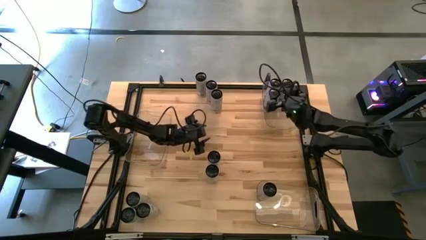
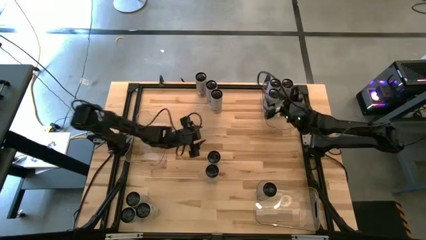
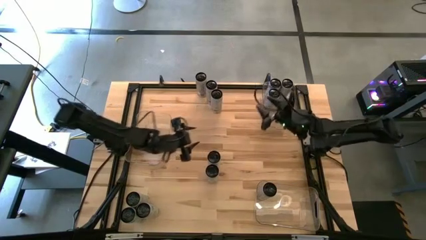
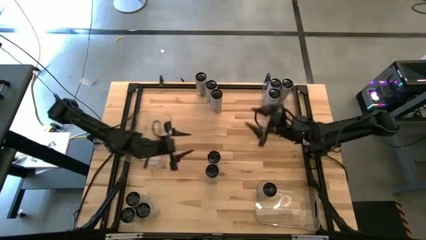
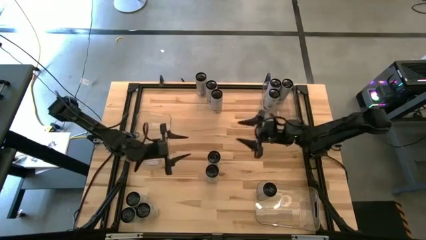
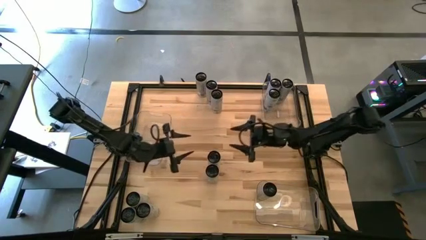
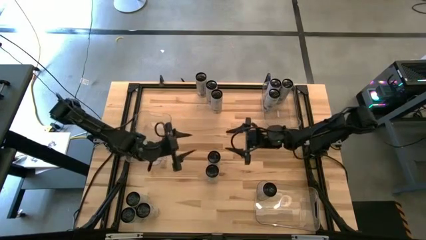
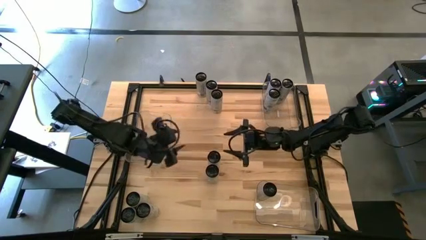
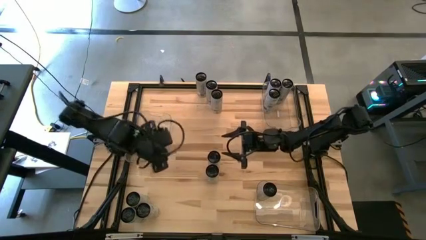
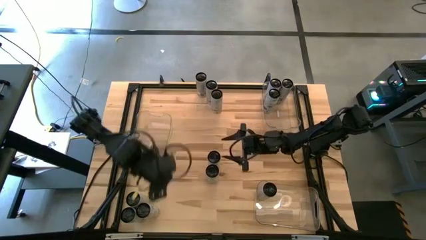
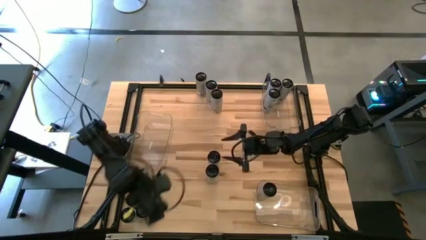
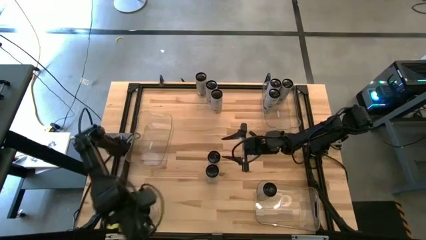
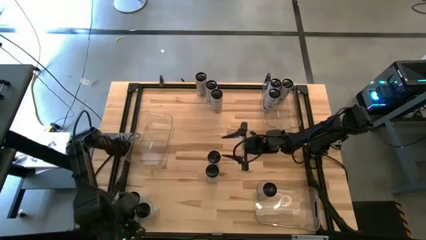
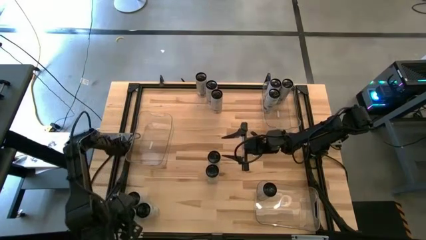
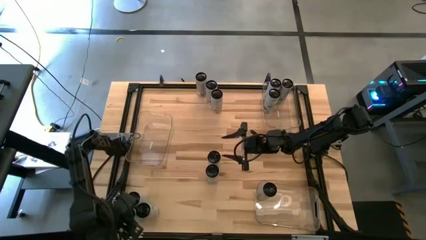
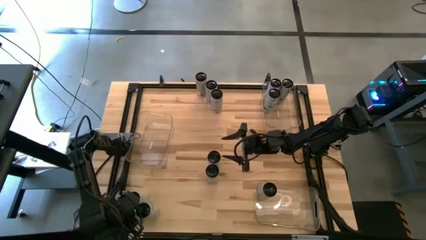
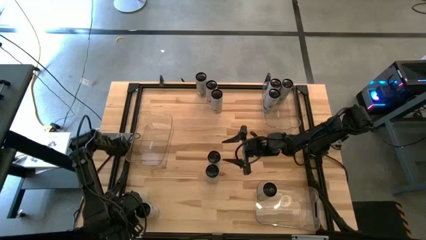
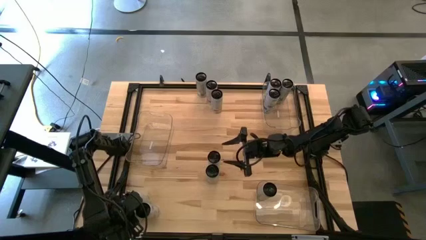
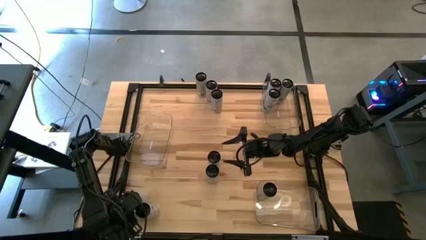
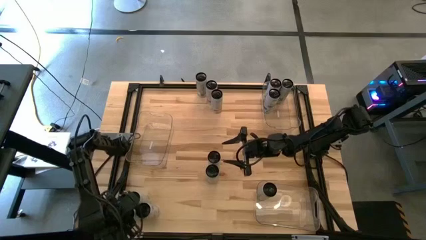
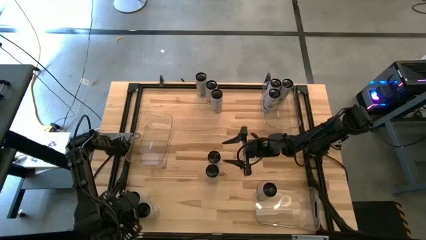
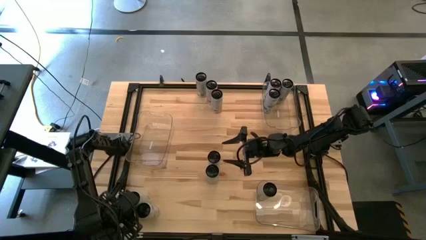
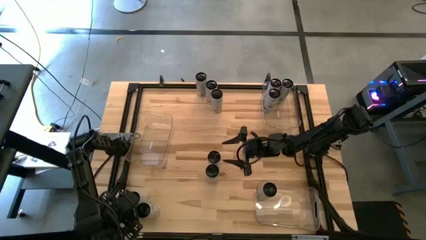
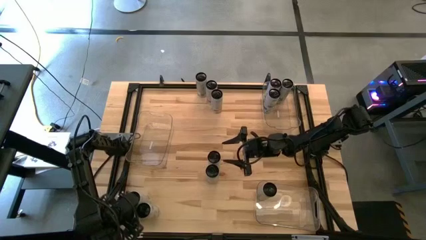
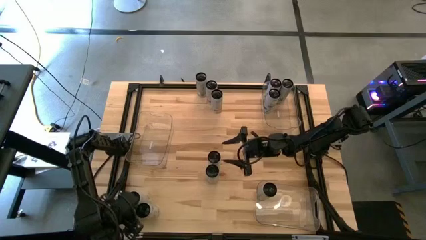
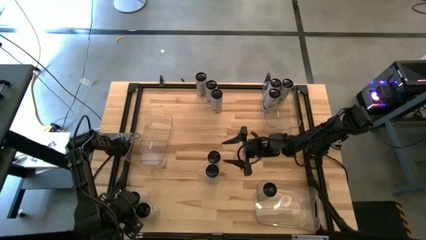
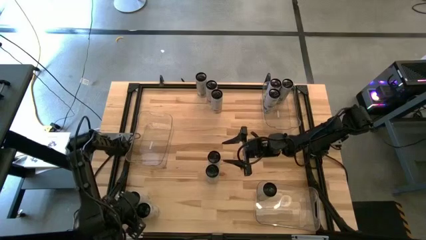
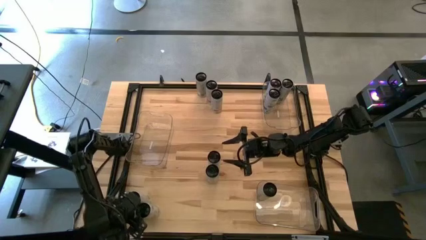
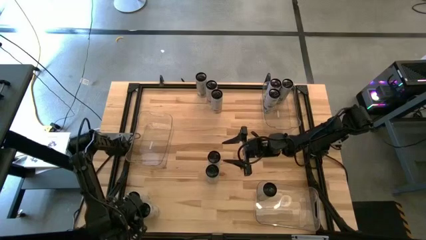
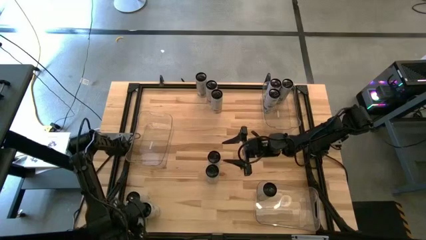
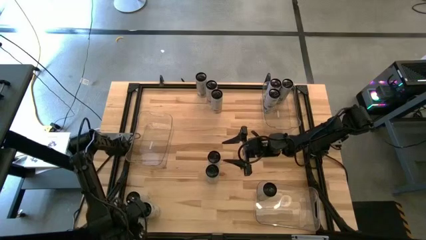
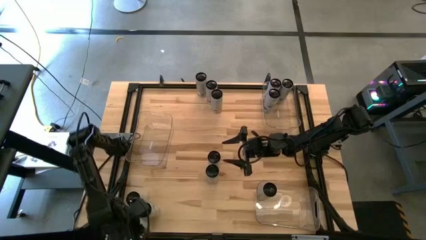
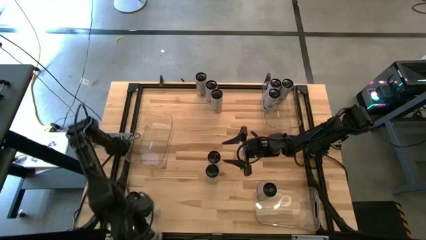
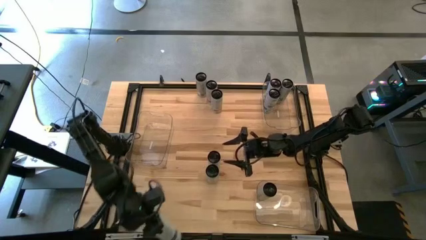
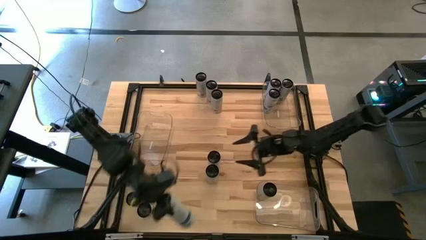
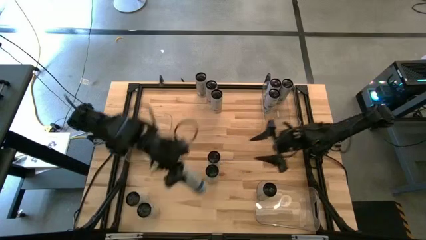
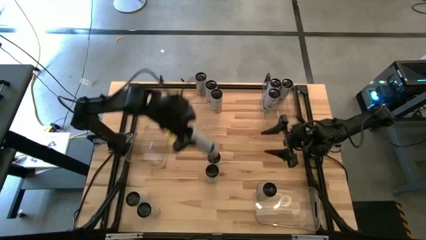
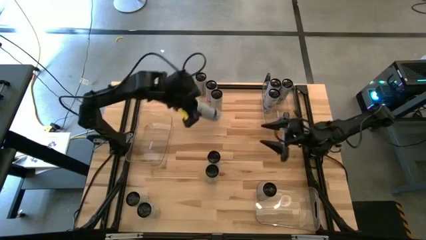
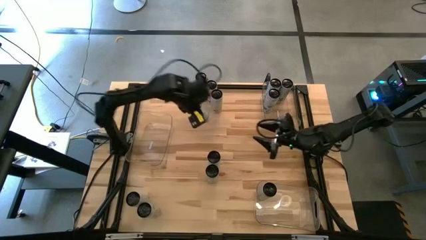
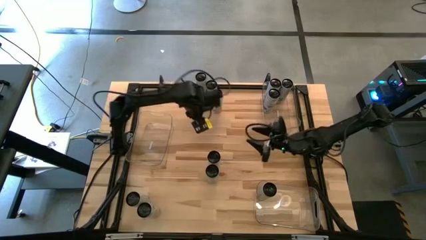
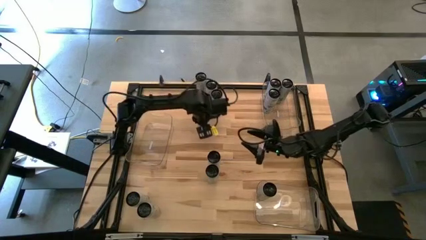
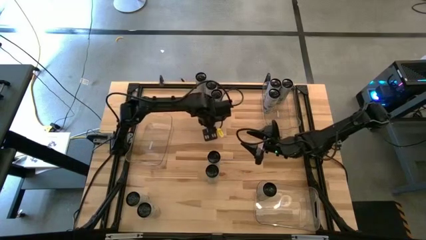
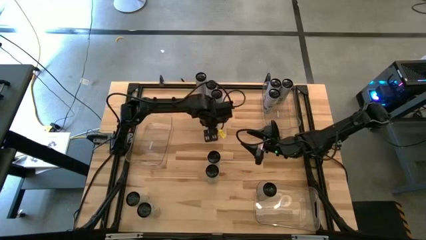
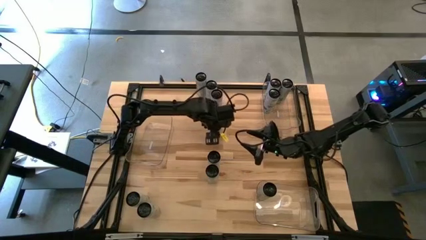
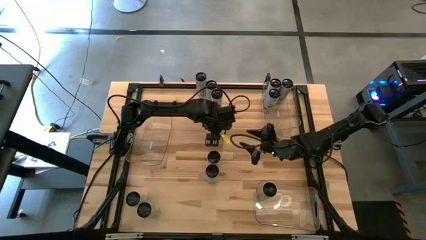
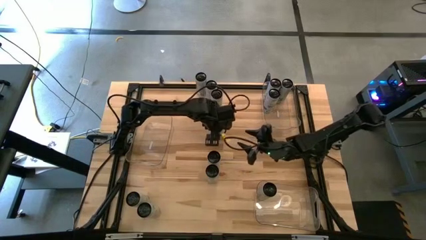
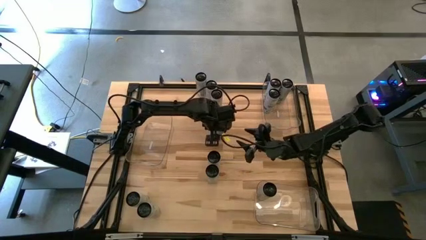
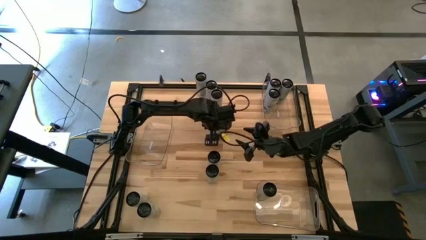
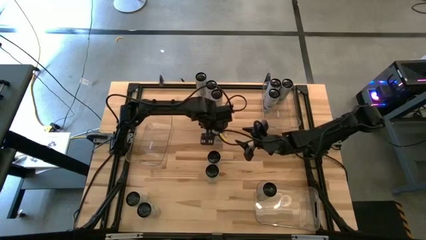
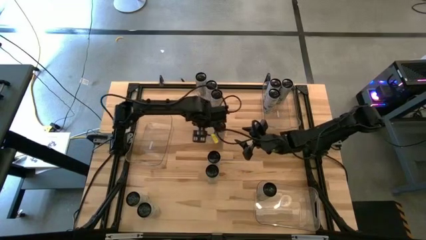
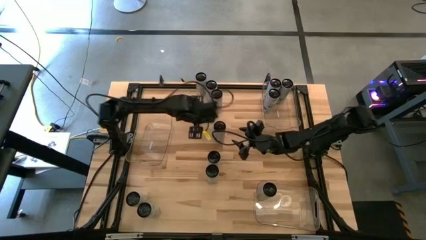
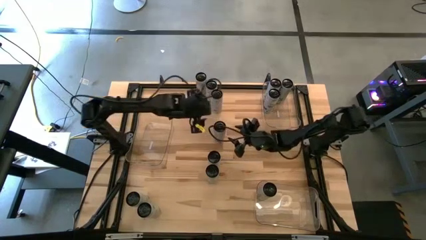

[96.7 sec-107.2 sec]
Task: Sort soda cans
Put the white-blue soda can into the top transparent bin

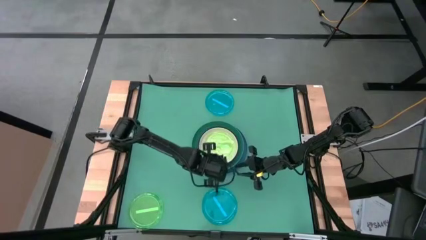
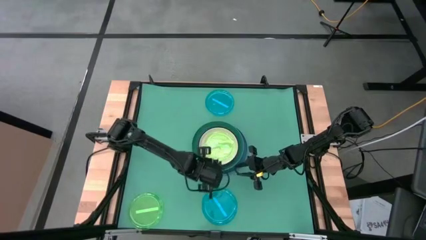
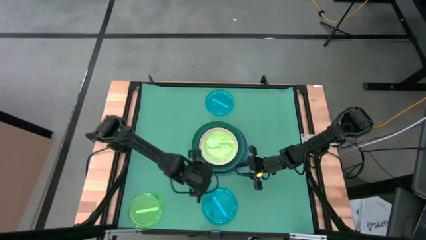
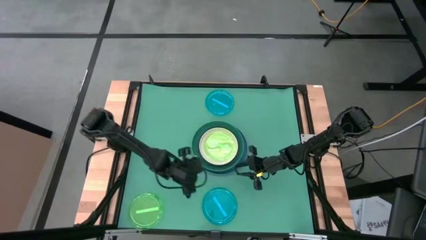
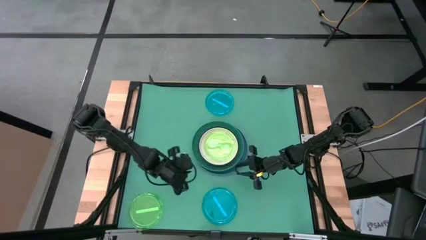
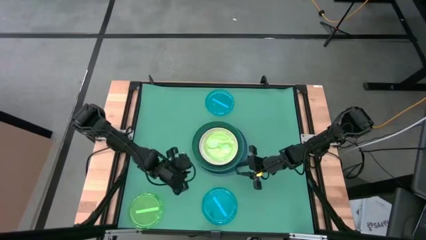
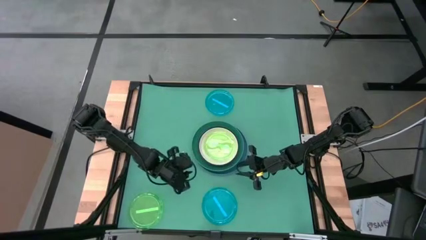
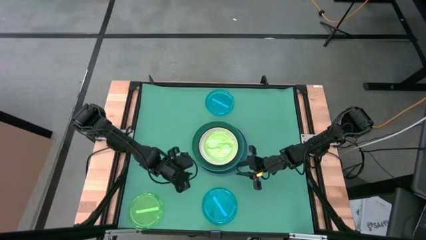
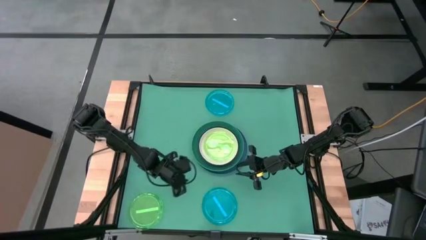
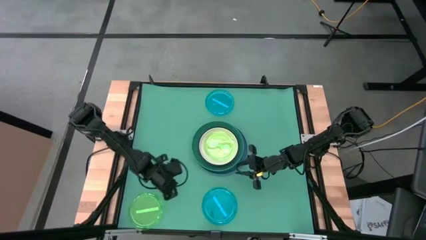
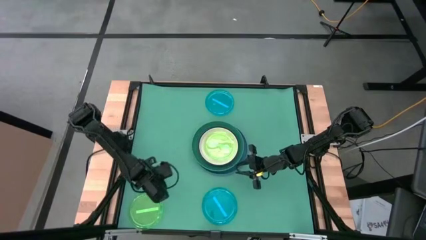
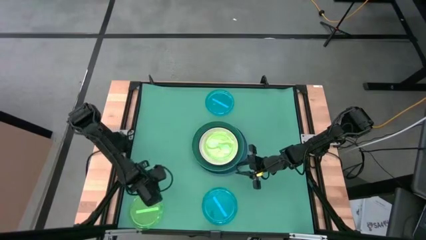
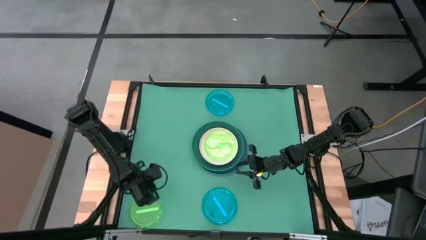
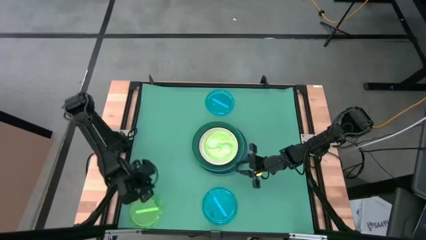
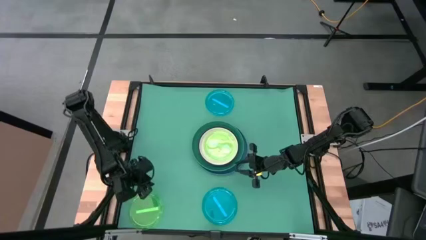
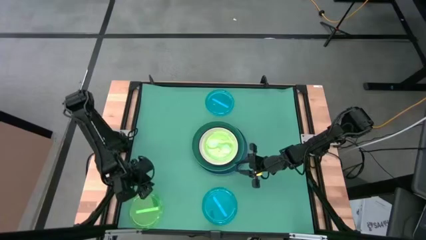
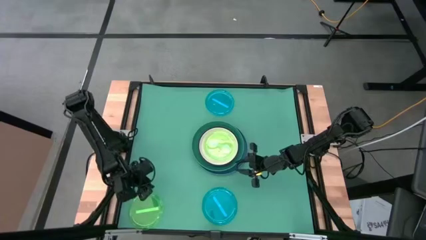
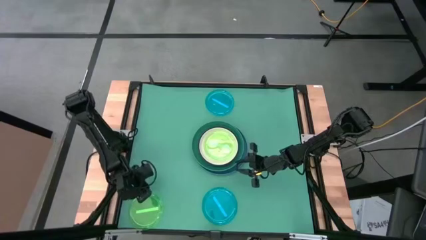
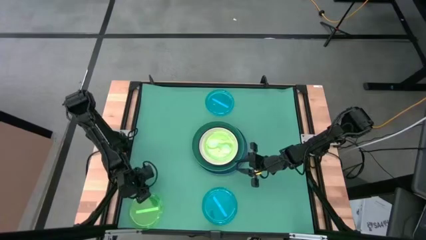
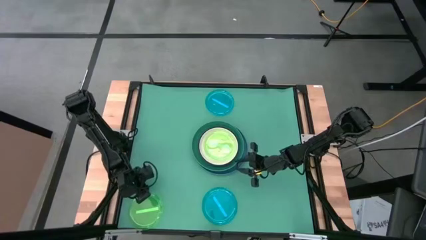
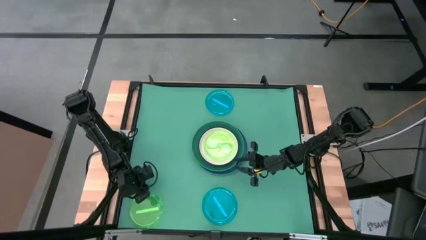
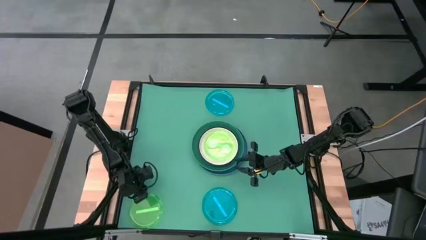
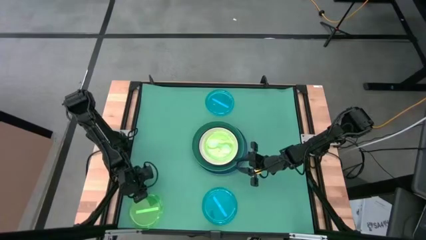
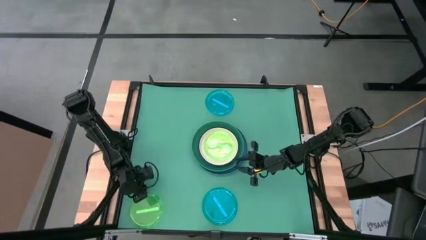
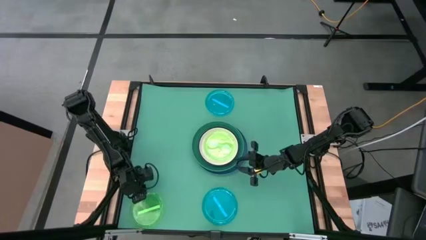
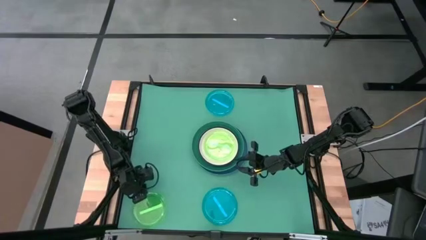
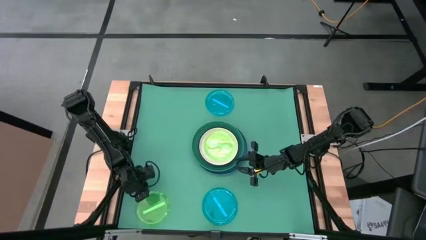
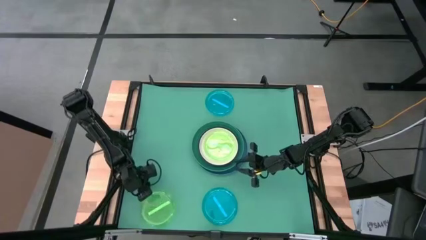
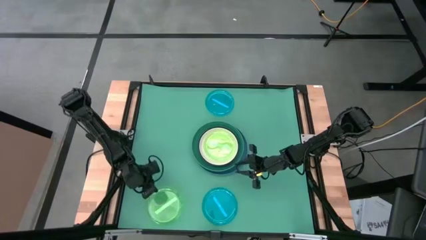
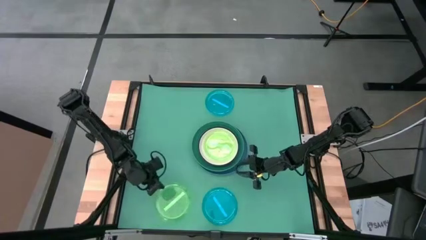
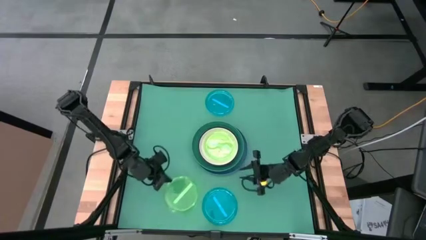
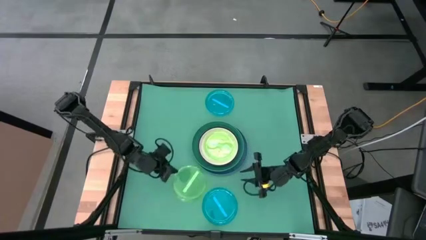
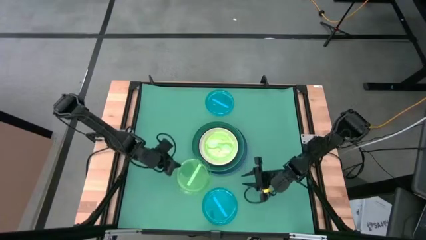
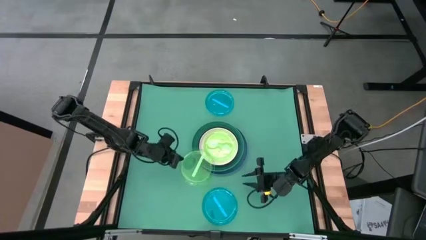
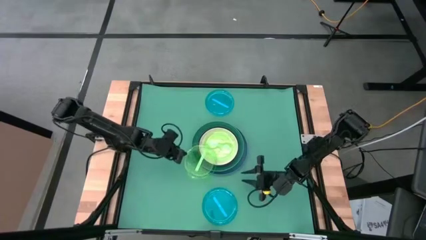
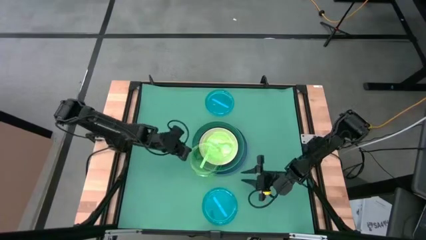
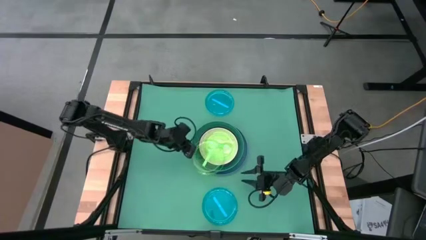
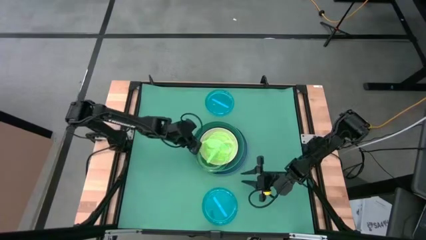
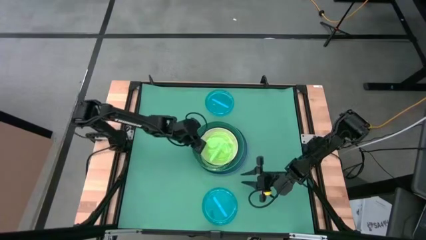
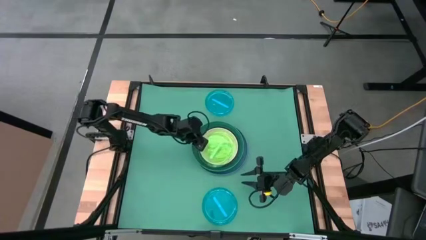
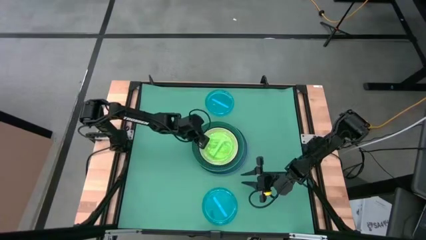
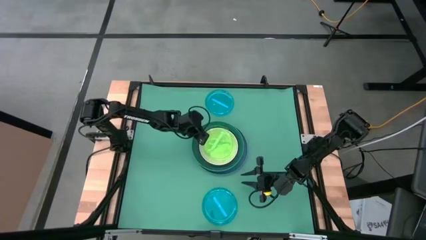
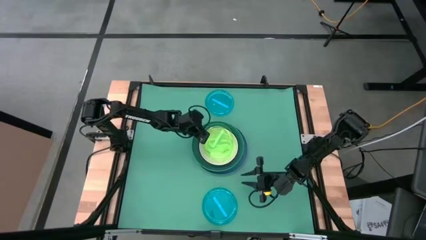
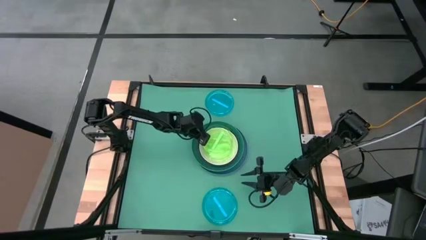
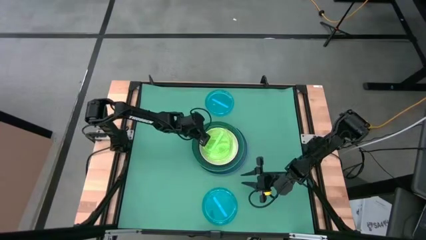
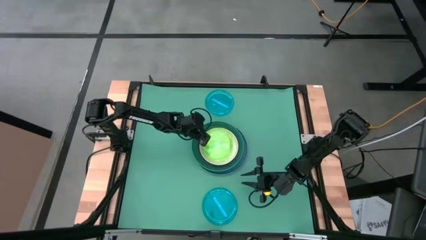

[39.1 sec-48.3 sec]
Task: Stack plastic plates
Stack the green plate on top of the green plate
